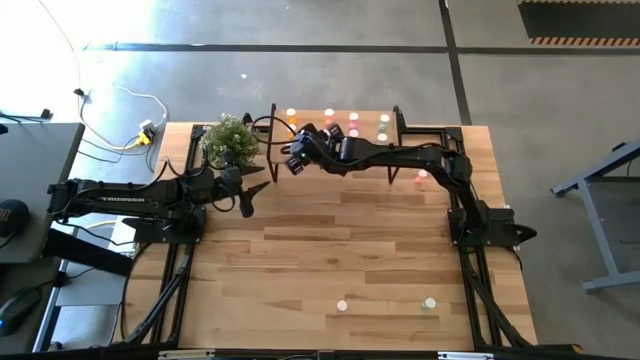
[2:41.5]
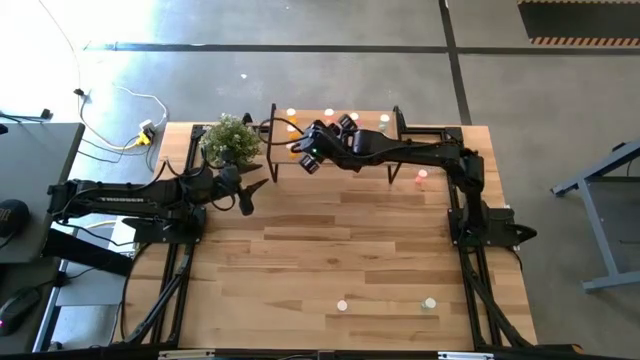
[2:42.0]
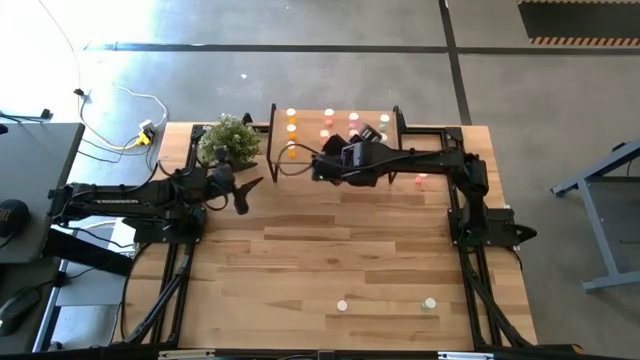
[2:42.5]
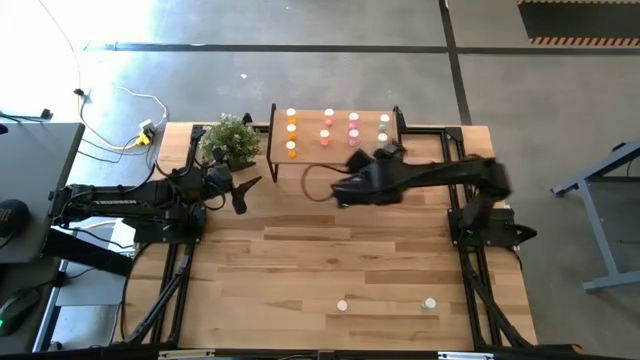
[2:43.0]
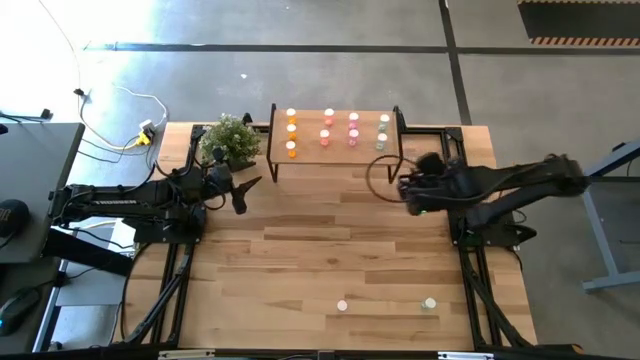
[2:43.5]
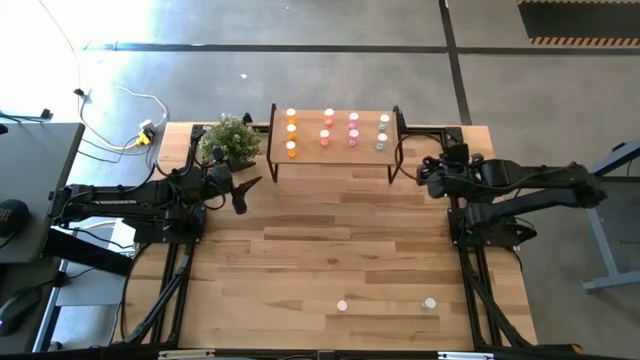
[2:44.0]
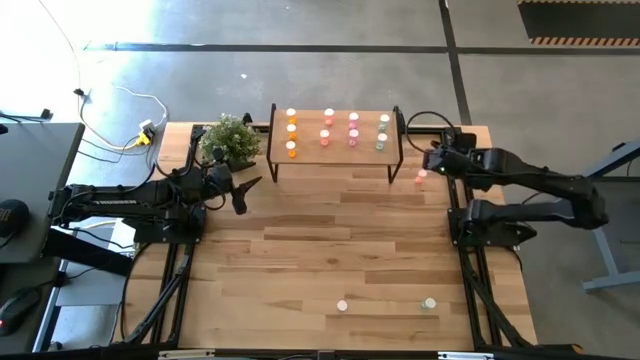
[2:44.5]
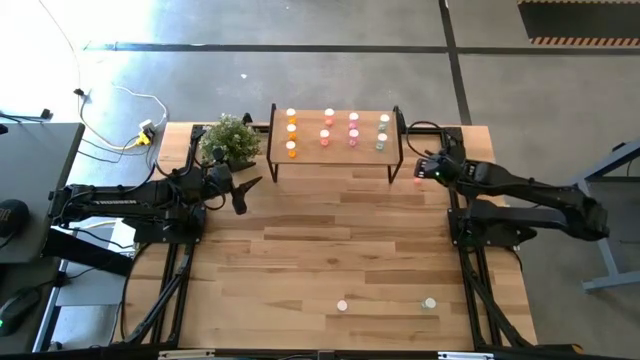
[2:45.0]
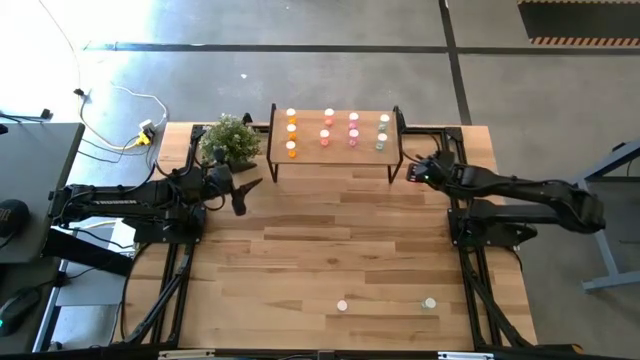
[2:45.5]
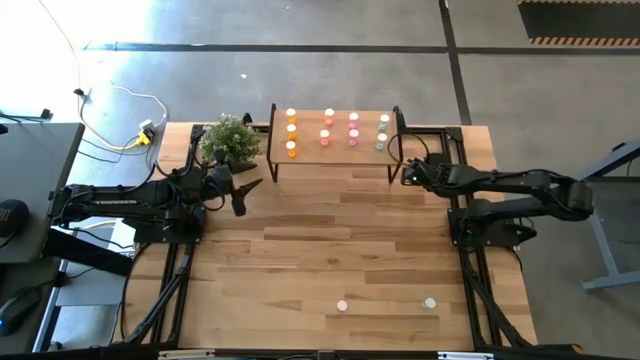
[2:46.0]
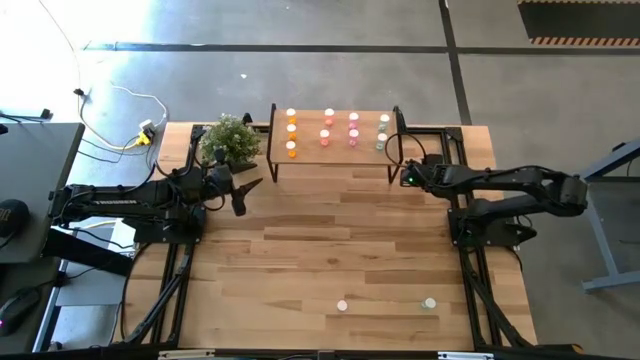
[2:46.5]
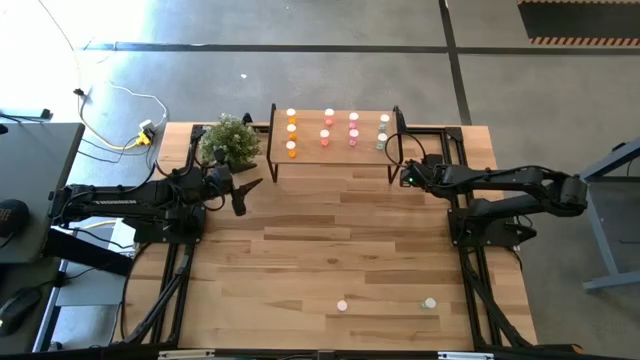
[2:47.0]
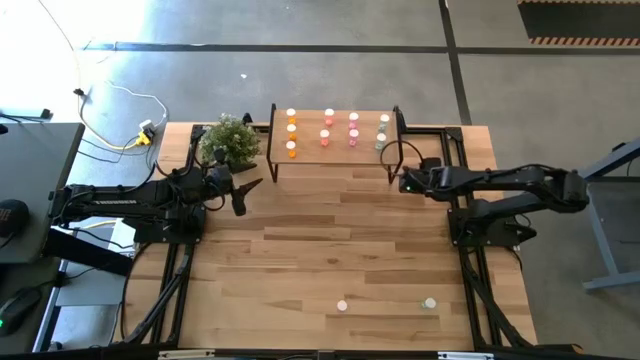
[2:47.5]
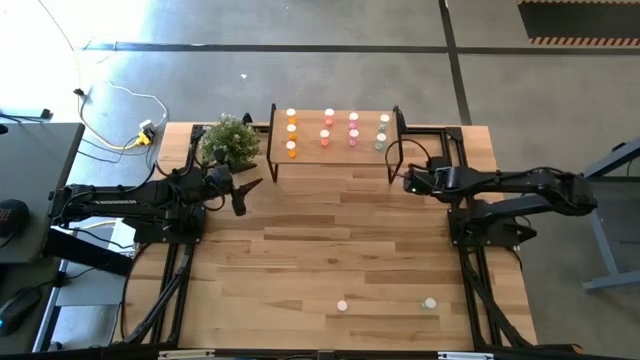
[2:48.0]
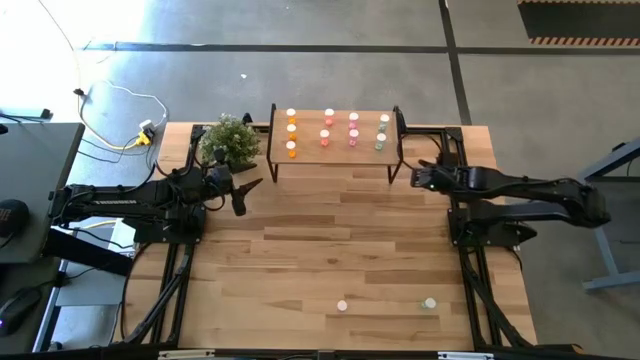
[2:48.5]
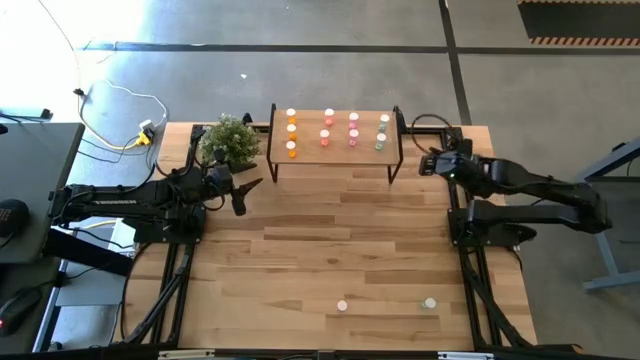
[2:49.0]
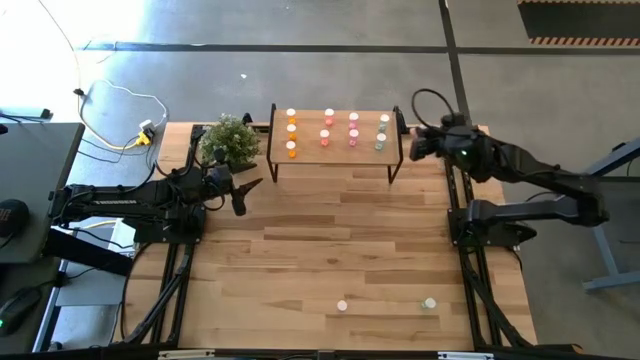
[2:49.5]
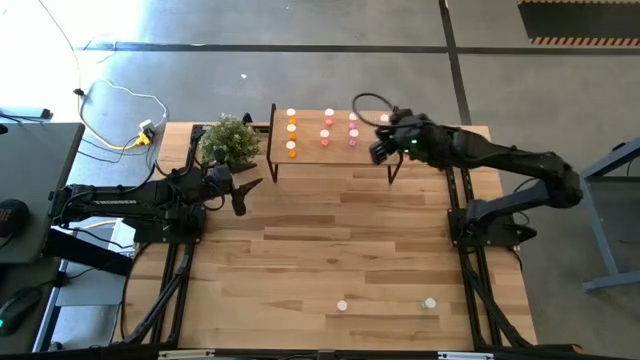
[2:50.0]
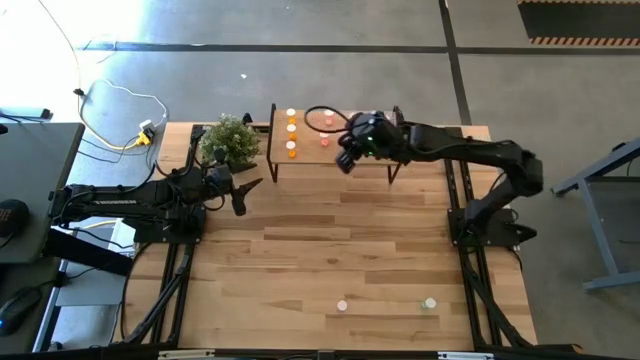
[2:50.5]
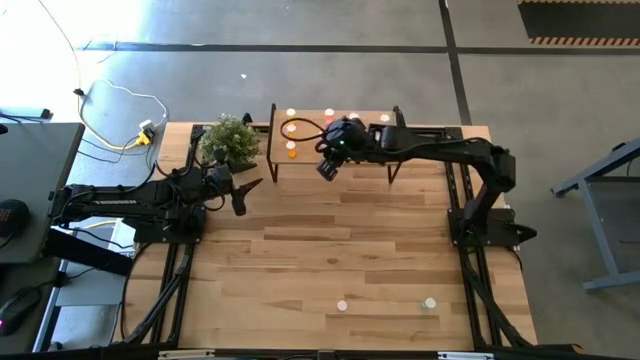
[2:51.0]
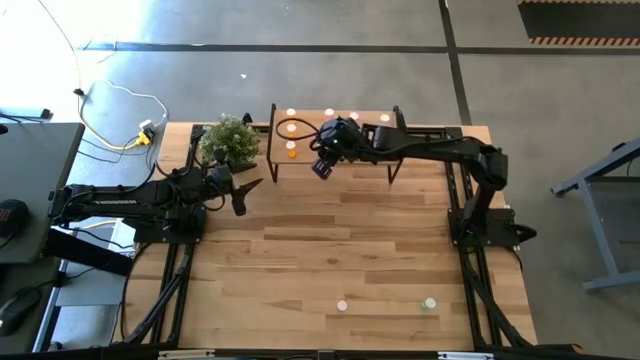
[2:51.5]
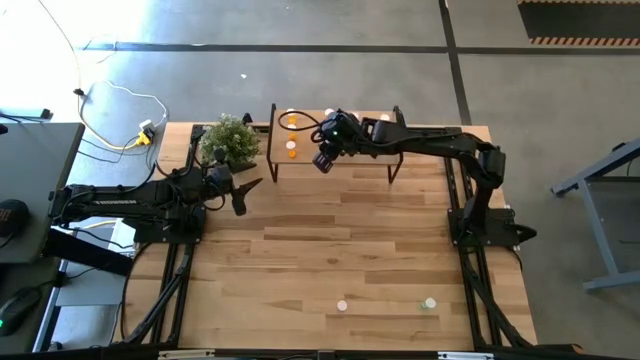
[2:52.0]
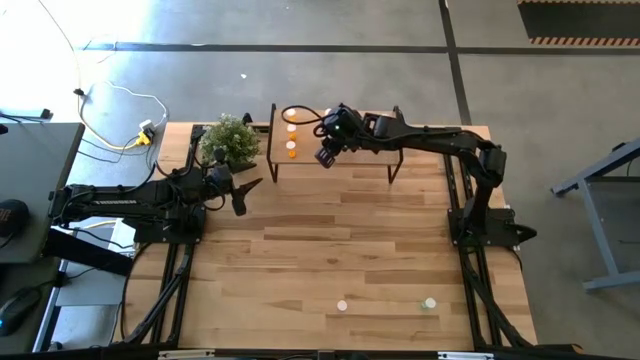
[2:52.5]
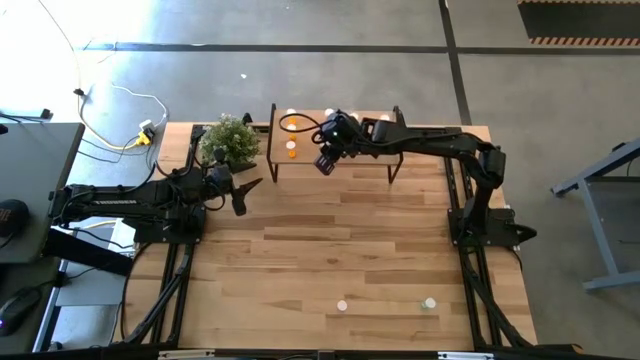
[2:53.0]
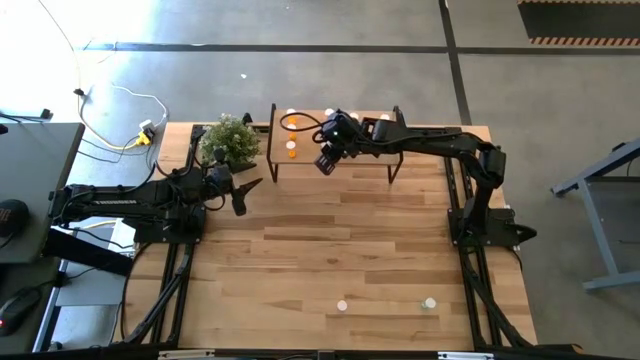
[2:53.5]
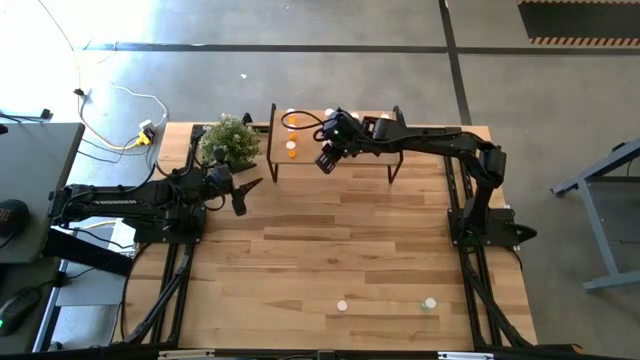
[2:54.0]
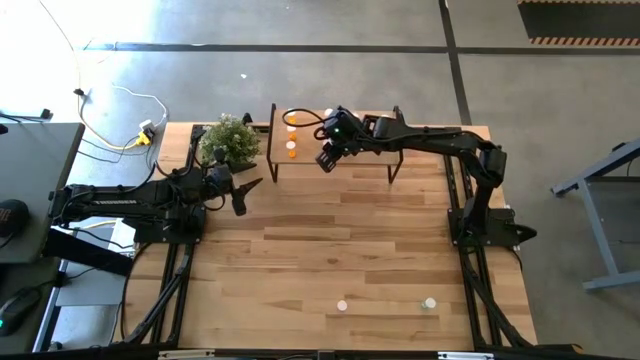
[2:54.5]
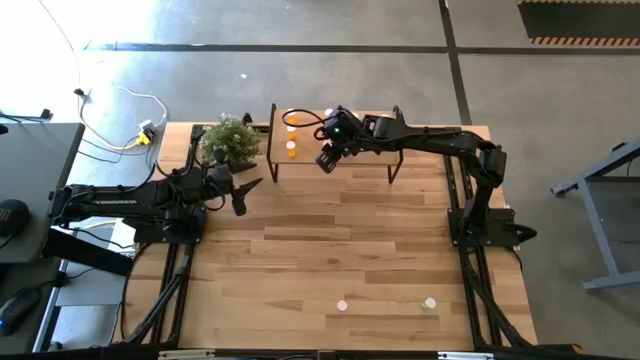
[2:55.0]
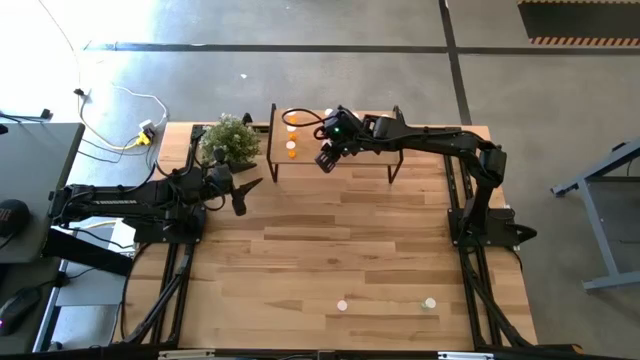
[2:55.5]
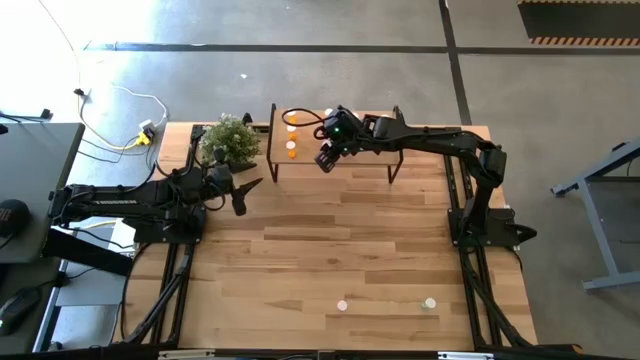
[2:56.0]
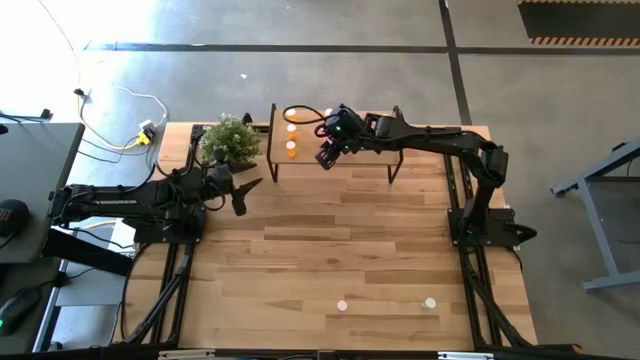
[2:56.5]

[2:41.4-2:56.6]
Task: Pick and place medicine bottles onto shelf by color
Put the pink pill bottle aligned with the other pink pill bottles on the shelf

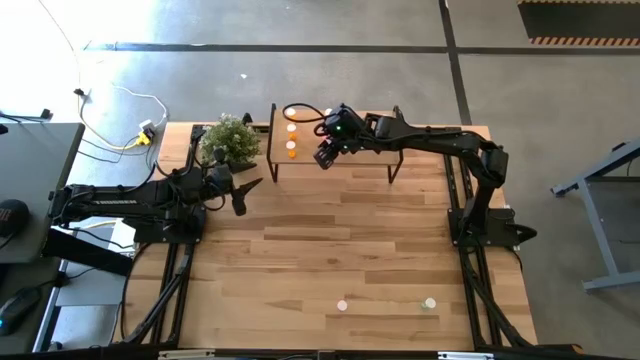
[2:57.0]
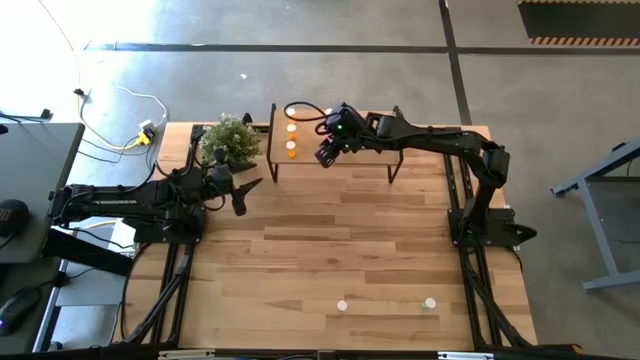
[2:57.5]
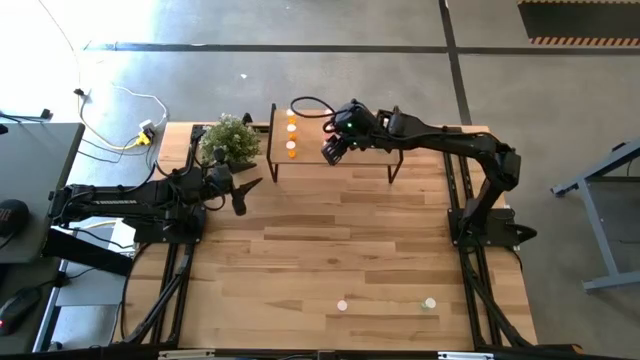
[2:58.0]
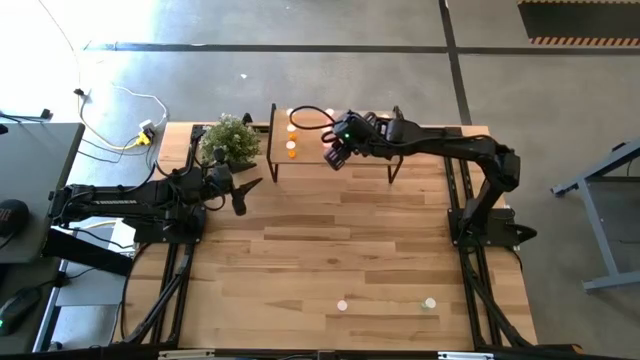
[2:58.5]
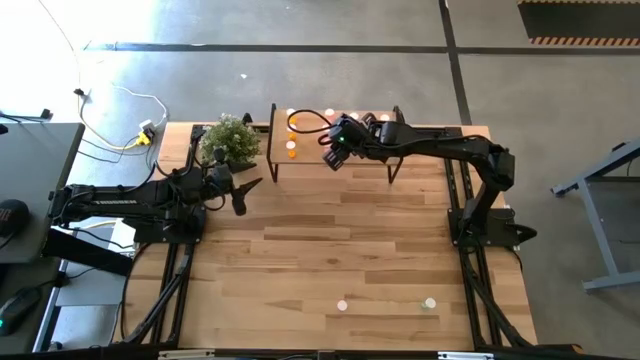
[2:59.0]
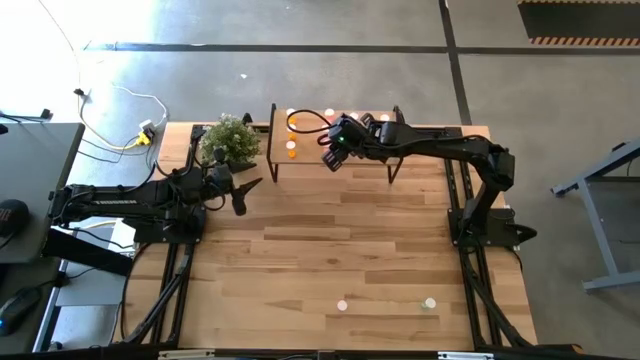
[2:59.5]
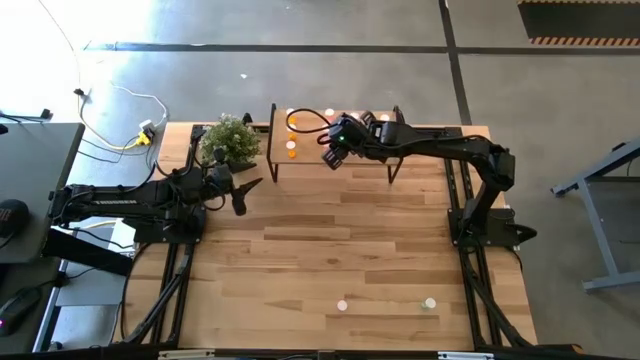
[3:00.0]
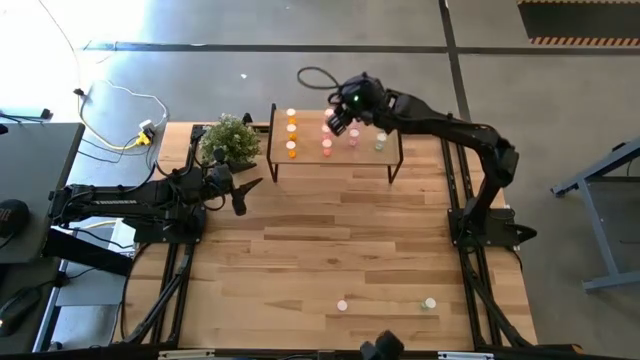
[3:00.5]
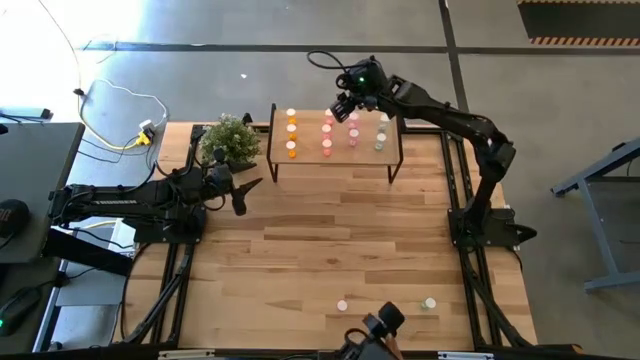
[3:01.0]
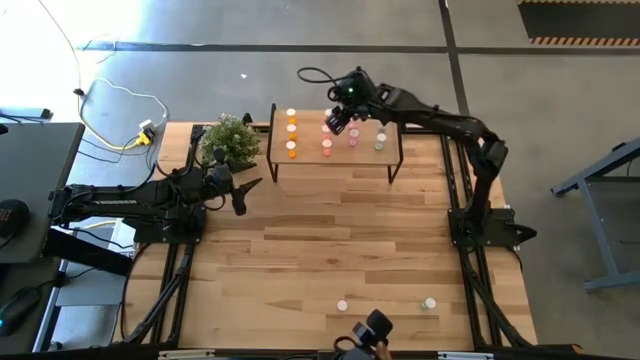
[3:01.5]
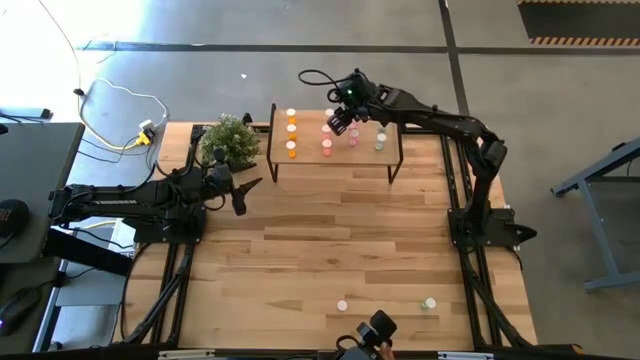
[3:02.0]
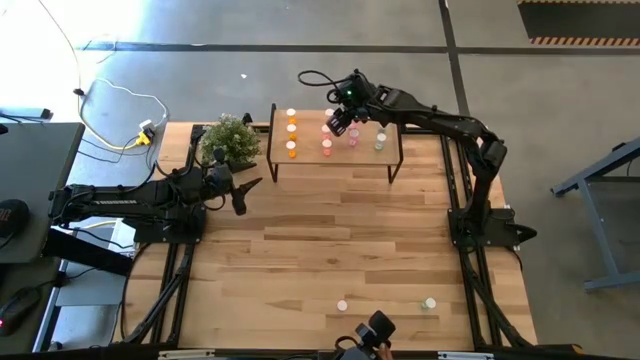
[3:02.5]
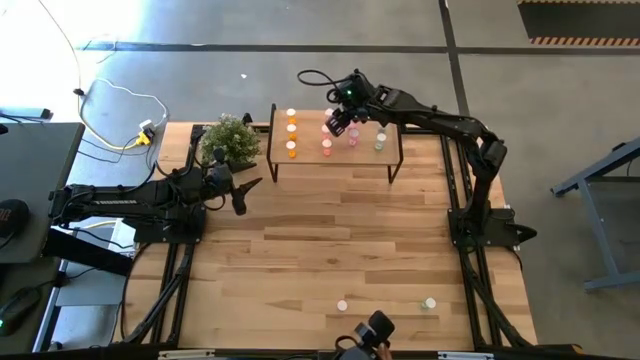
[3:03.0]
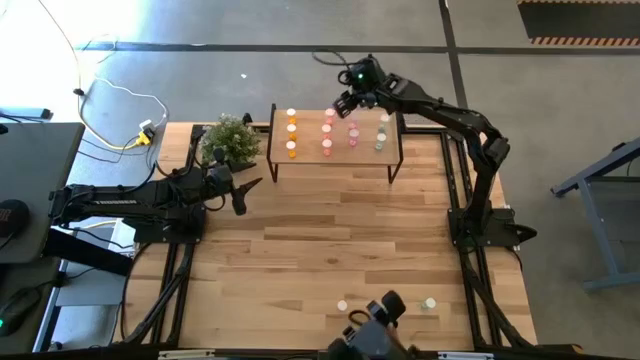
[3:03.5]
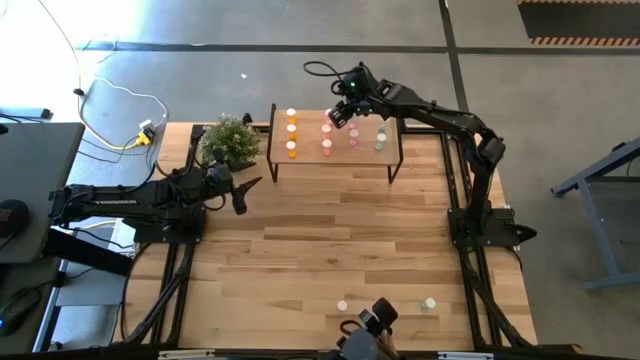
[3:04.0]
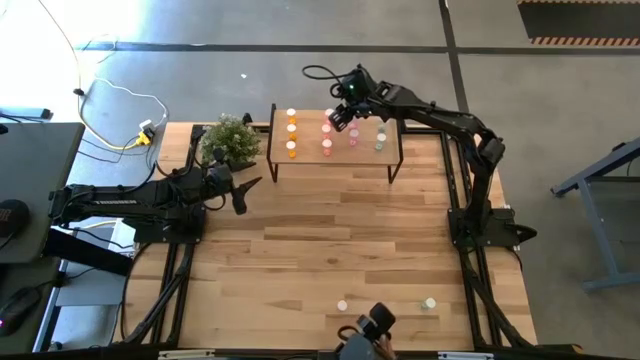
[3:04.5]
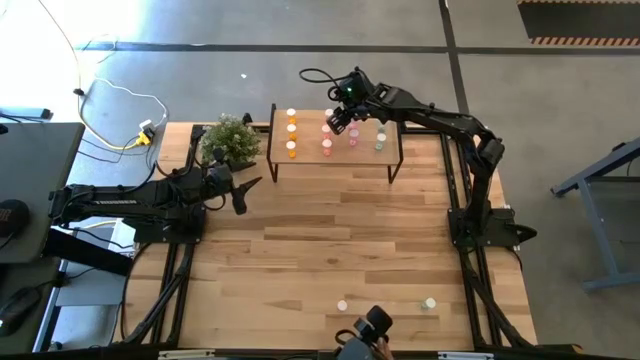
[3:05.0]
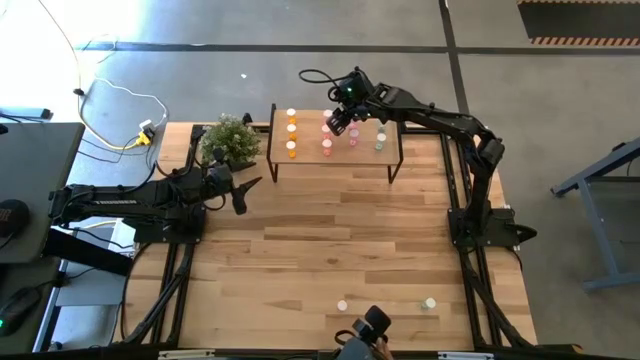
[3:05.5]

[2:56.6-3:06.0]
Adjust the pink pill bottles in the shelf
